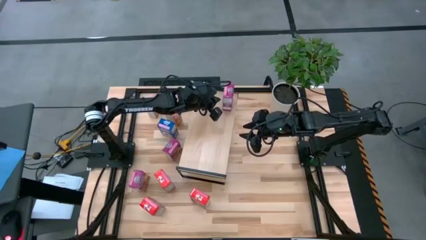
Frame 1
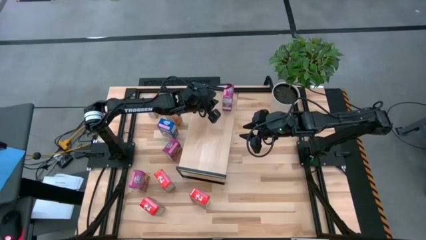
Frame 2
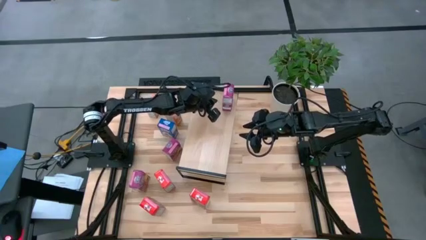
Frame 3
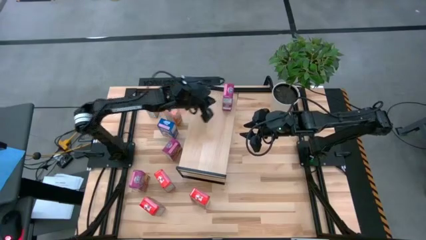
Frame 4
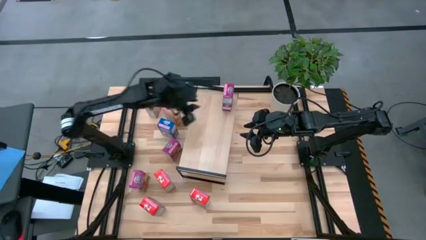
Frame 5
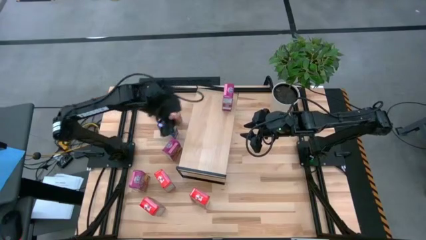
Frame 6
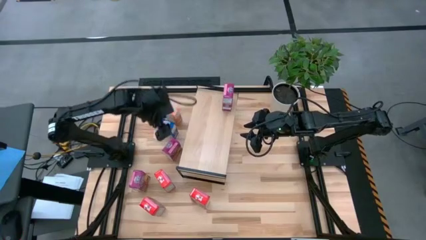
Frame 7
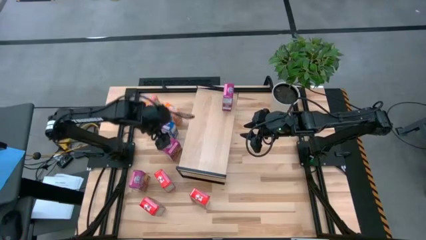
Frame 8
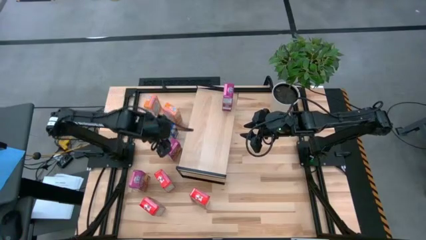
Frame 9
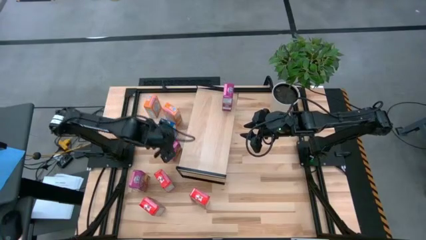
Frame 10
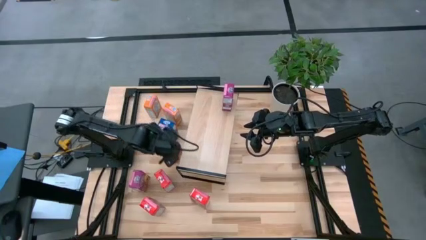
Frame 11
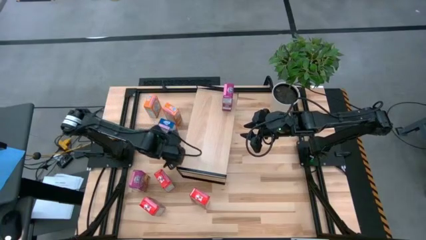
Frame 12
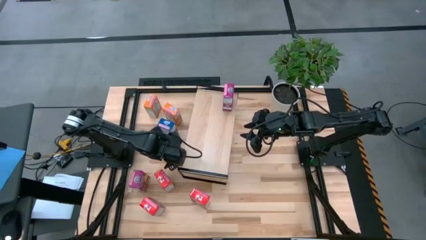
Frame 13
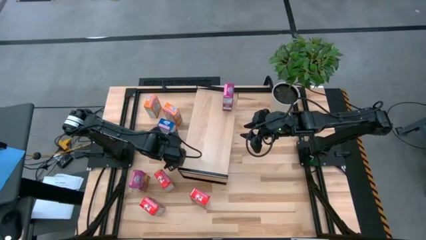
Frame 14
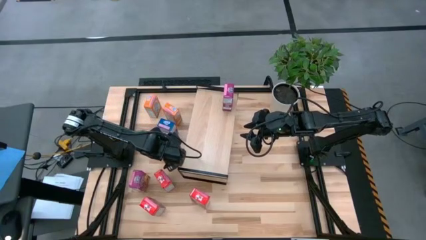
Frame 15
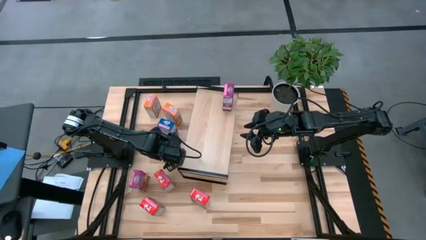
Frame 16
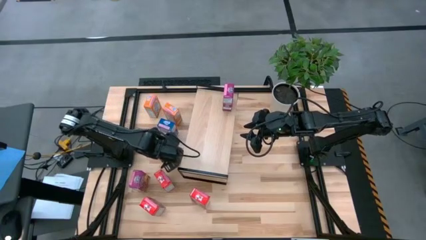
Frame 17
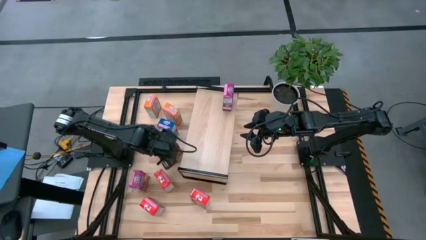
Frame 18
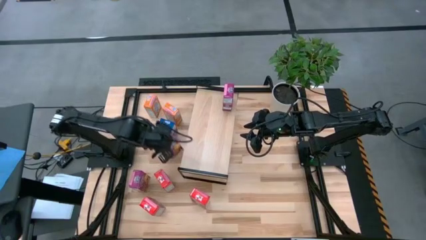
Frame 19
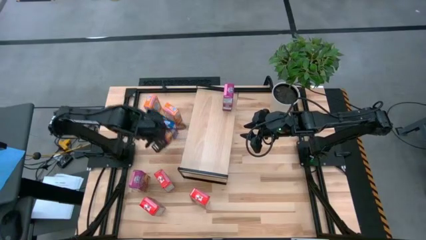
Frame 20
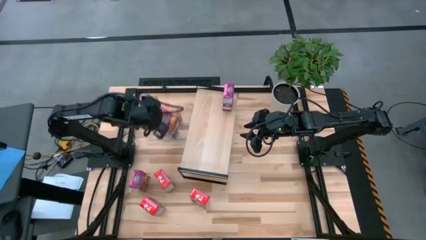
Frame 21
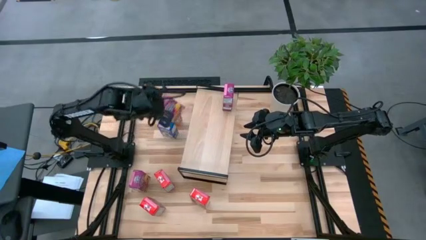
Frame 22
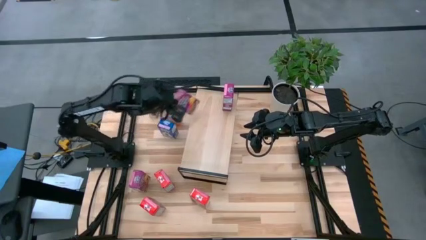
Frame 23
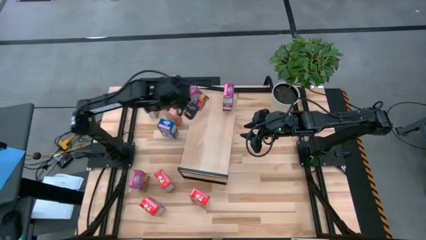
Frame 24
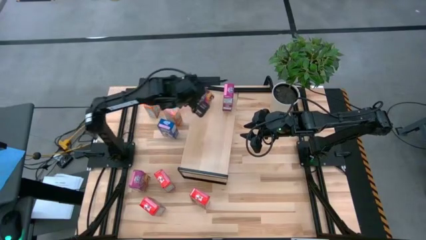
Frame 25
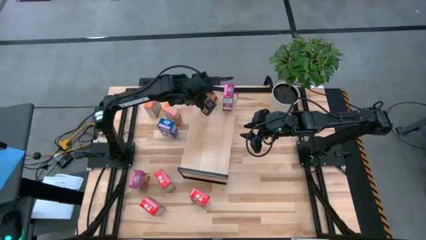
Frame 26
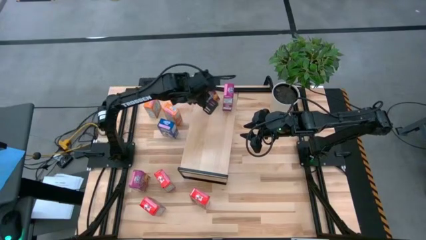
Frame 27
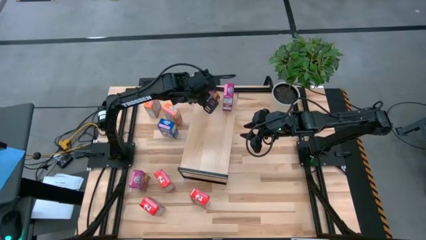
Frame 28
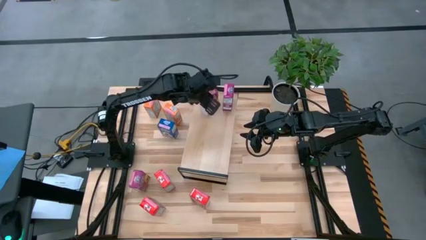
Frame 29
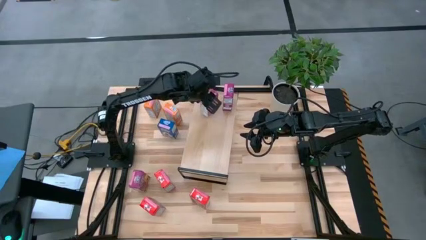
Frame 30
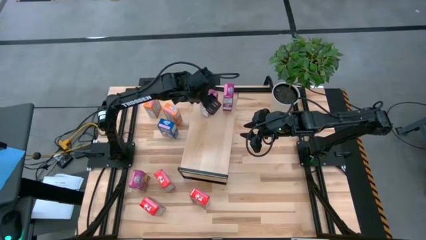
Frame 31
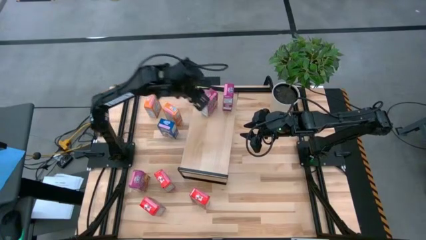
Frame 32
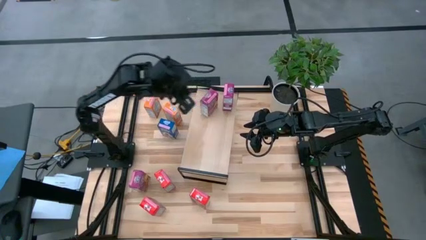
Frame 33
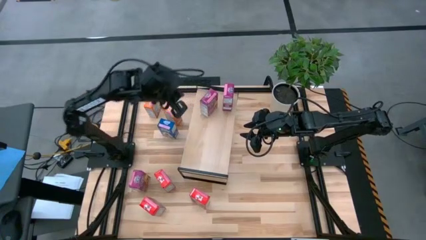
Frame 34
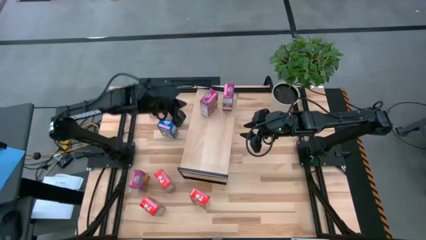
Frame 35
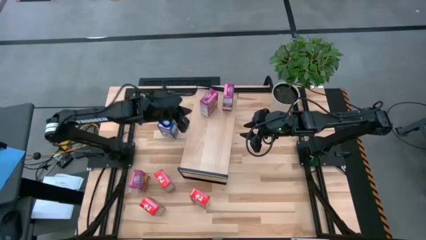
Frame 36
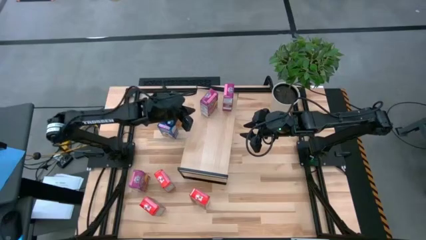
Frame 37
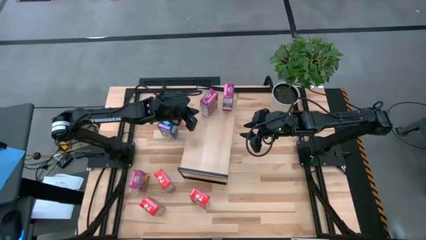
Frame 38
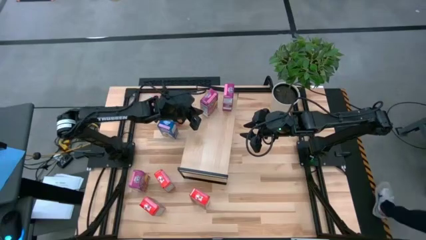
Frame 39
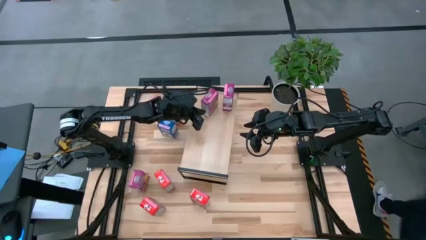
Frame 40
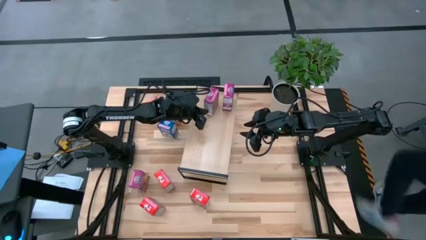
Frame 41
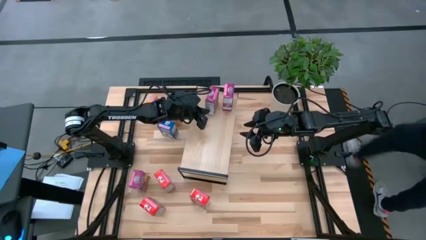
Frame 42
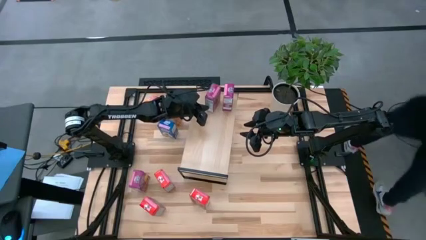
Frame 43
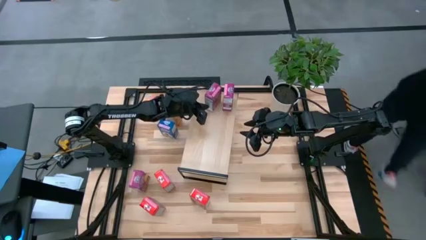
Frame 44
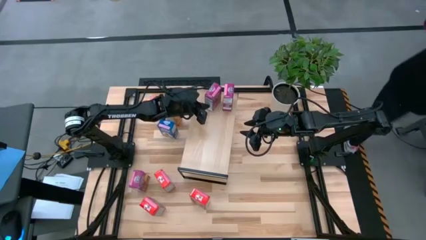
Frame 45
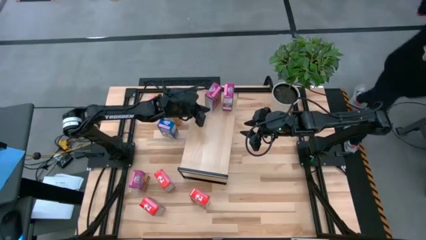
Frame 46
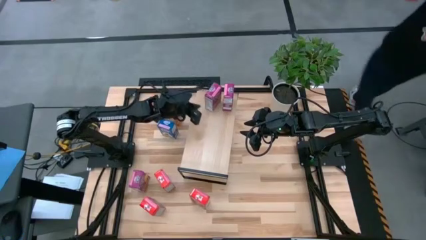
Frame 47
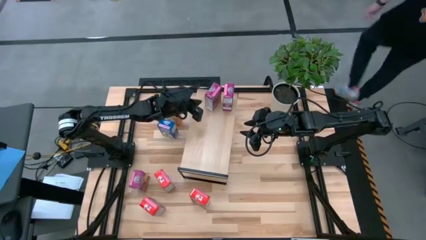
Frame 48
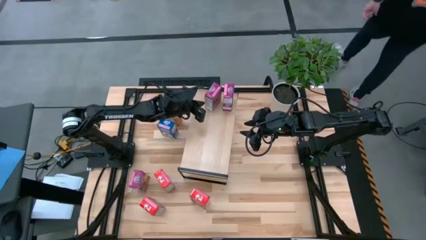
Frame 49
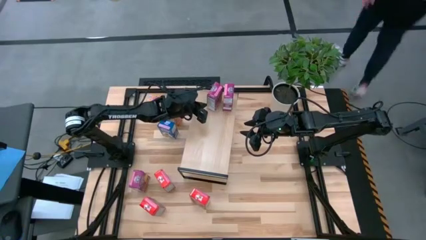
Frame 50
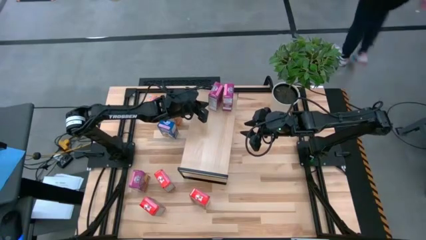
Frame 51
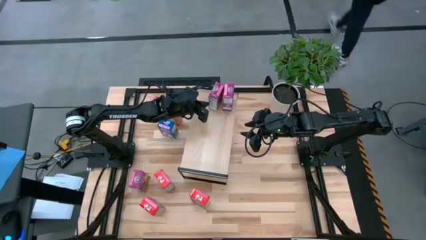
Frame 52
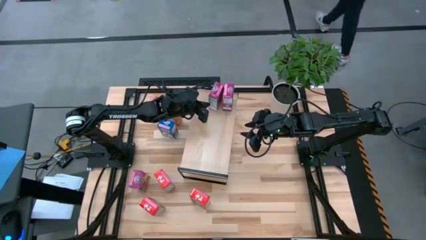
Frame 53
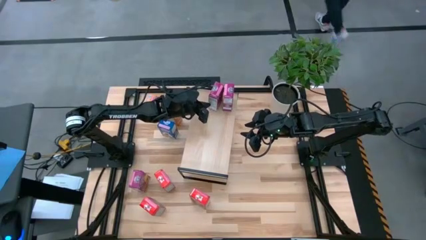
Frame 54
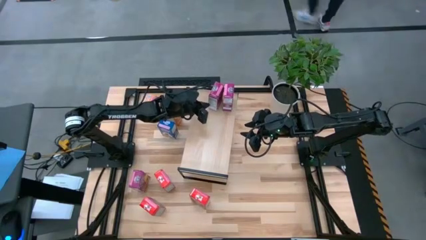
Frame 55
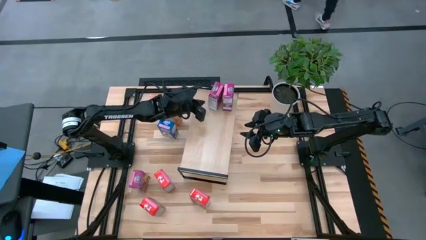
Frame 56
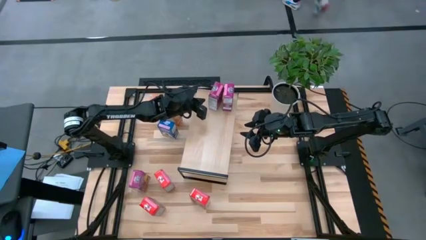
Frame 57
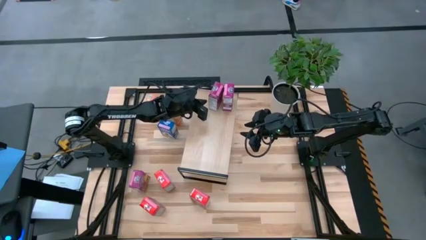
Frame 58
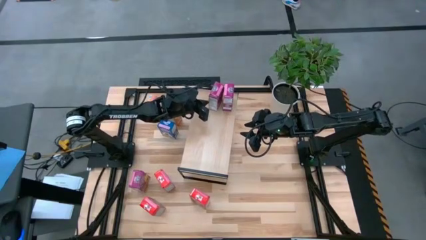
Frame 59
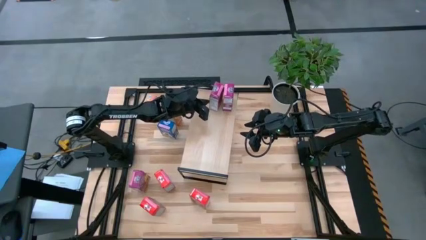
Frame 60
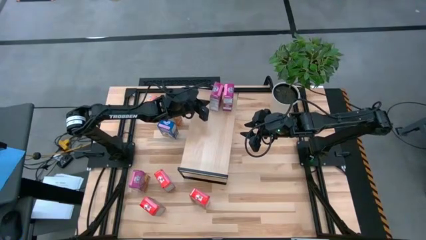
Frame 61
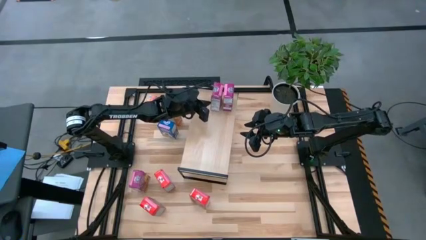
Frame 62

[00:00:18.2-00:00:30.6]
Task: Stack cereal on shelf
Put the top purple cereal box on the shelf
